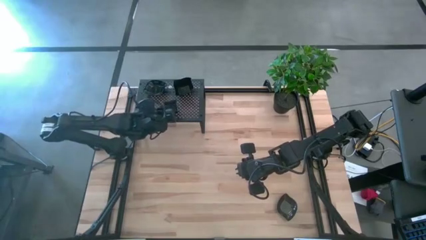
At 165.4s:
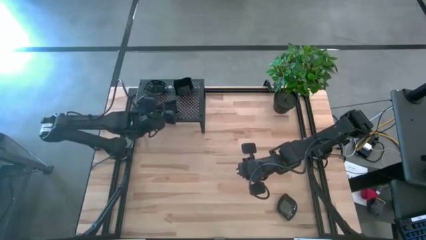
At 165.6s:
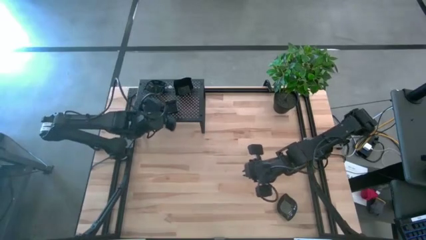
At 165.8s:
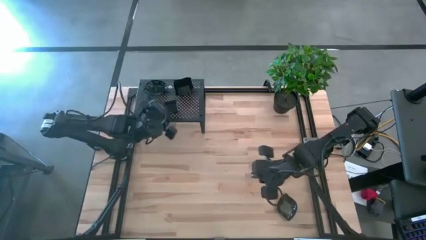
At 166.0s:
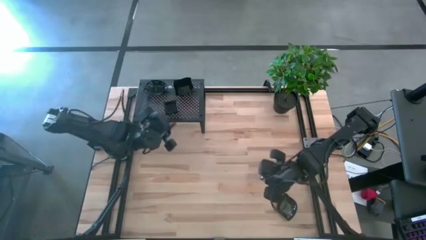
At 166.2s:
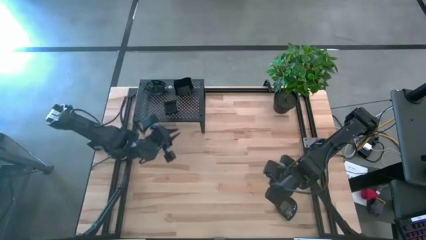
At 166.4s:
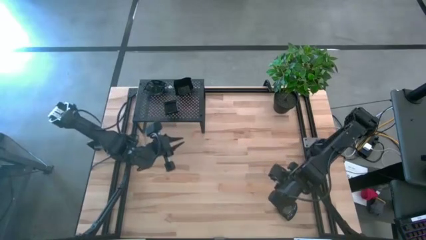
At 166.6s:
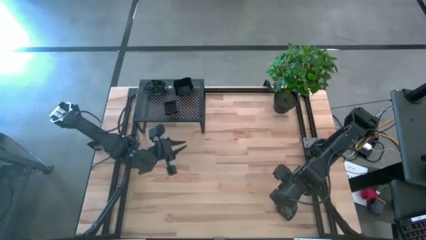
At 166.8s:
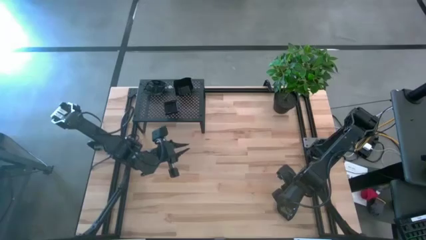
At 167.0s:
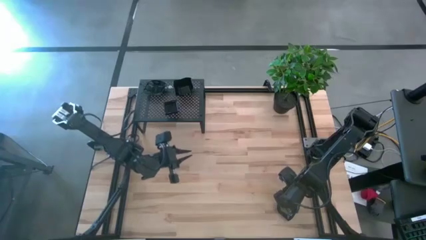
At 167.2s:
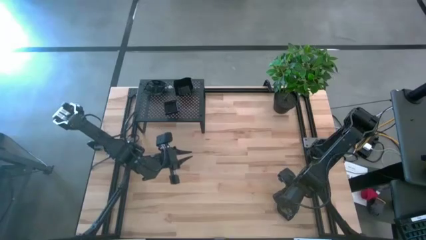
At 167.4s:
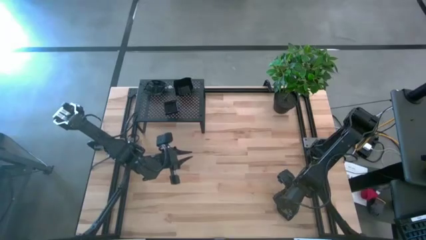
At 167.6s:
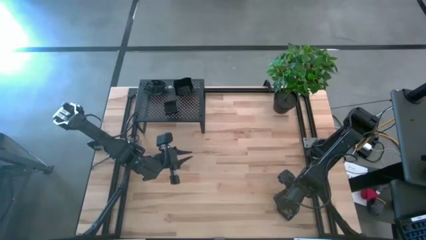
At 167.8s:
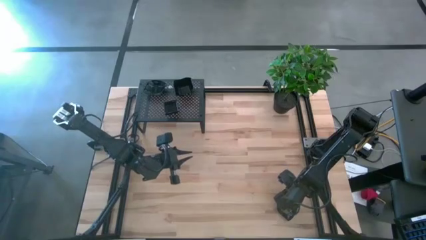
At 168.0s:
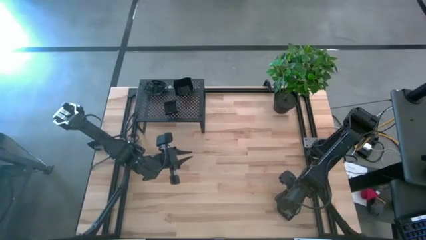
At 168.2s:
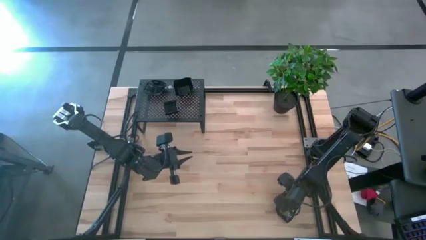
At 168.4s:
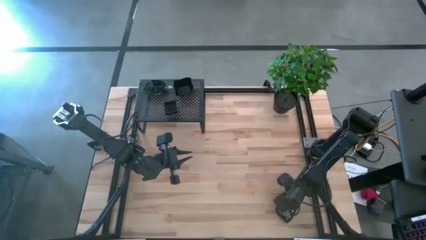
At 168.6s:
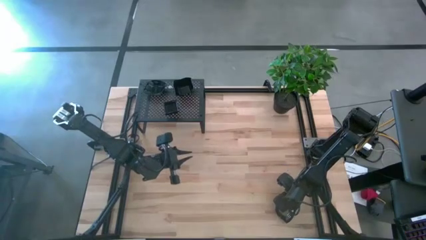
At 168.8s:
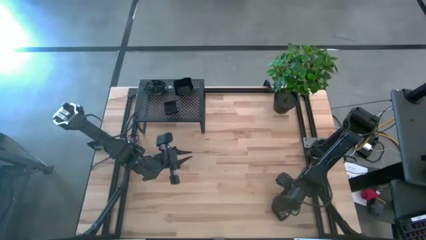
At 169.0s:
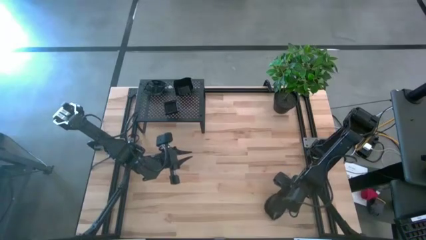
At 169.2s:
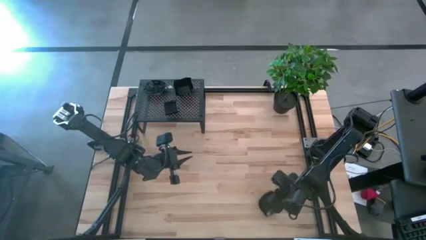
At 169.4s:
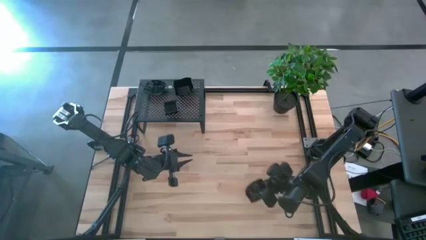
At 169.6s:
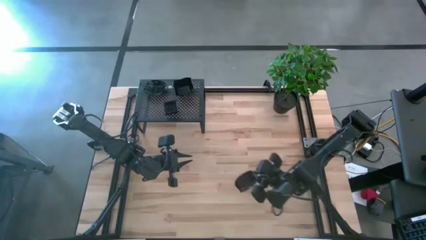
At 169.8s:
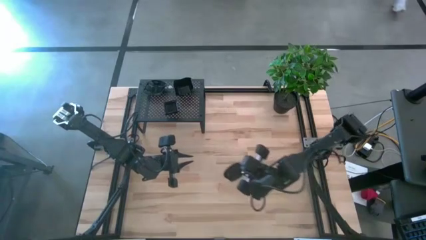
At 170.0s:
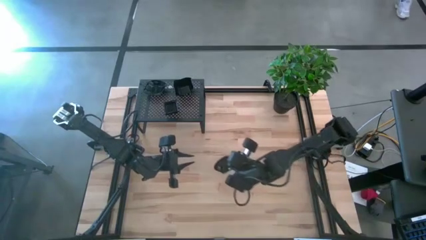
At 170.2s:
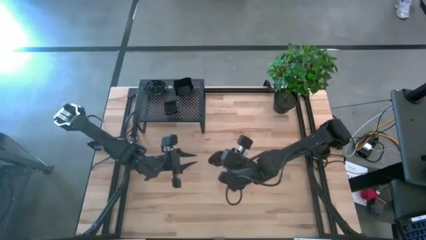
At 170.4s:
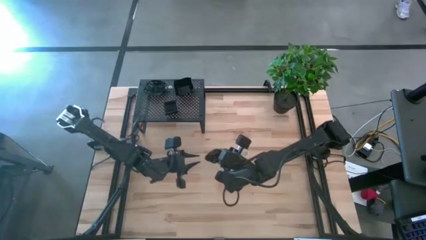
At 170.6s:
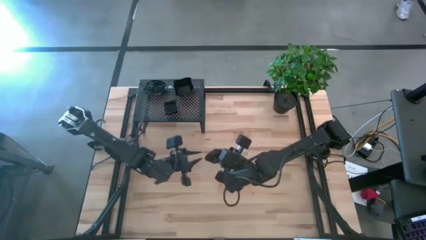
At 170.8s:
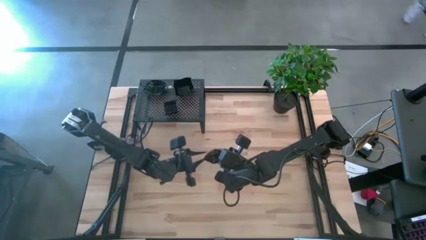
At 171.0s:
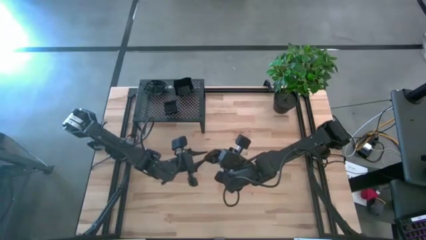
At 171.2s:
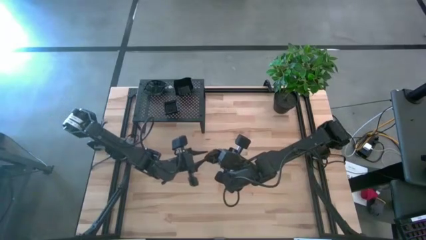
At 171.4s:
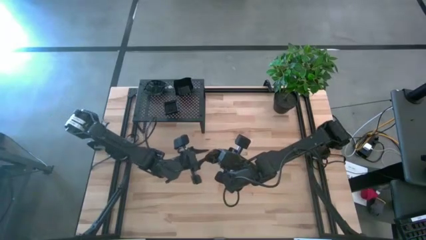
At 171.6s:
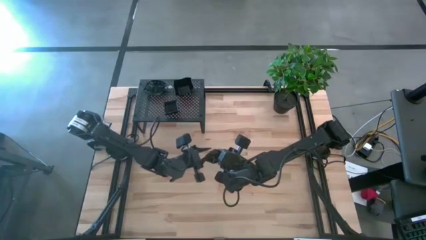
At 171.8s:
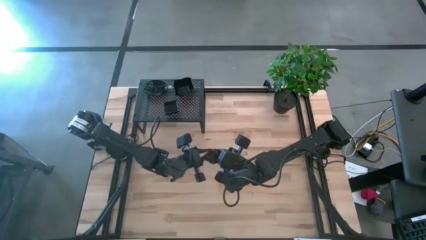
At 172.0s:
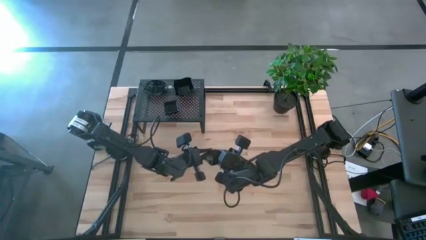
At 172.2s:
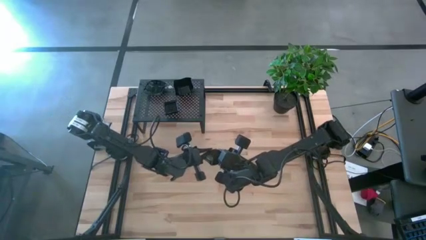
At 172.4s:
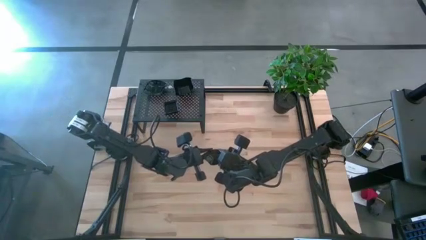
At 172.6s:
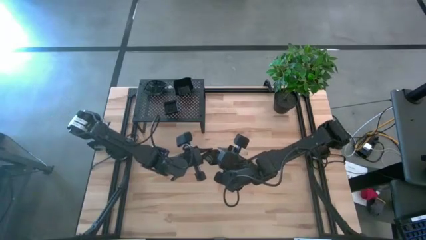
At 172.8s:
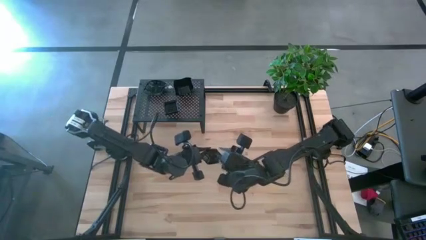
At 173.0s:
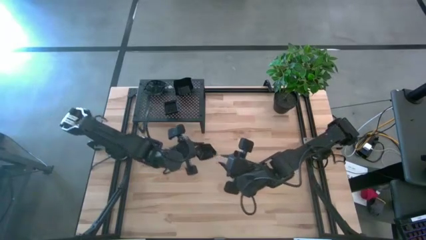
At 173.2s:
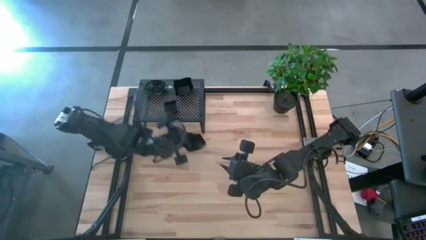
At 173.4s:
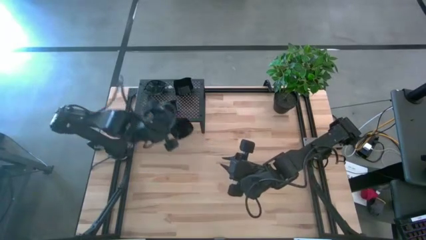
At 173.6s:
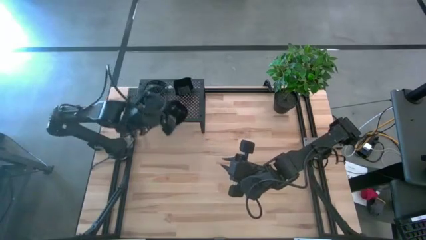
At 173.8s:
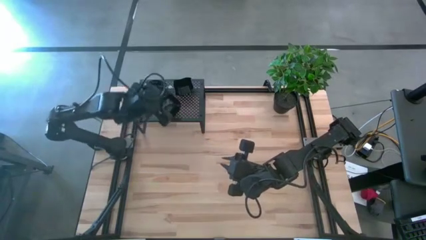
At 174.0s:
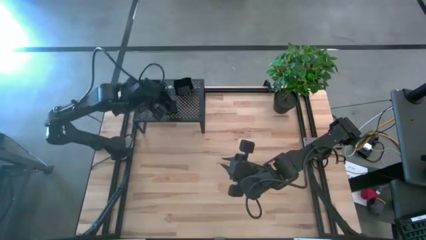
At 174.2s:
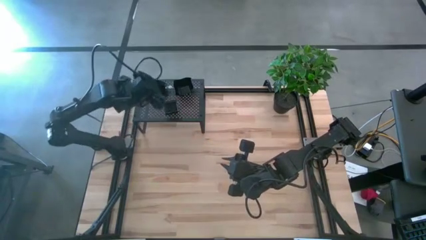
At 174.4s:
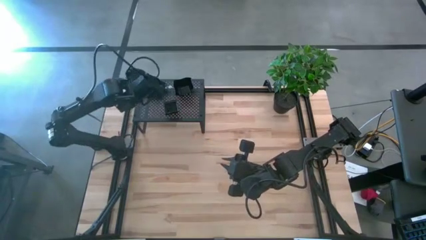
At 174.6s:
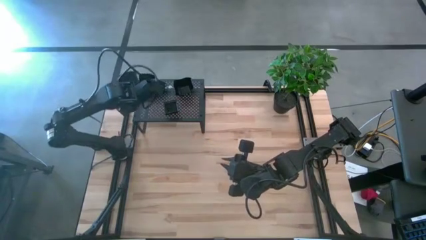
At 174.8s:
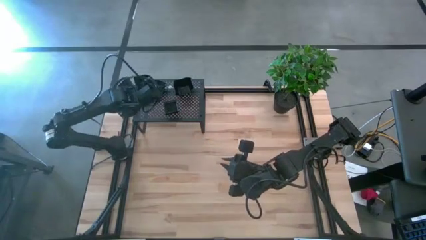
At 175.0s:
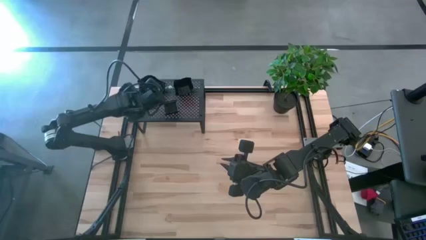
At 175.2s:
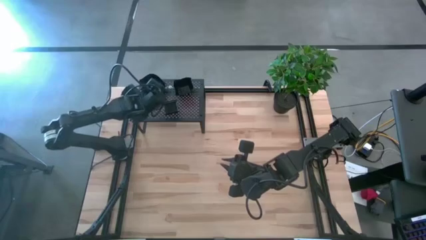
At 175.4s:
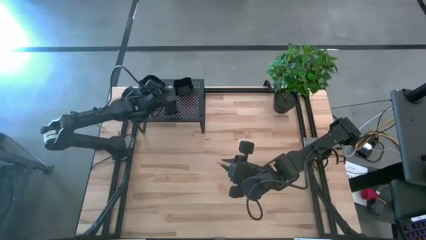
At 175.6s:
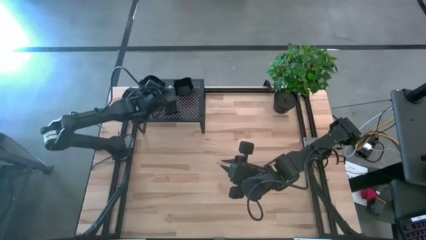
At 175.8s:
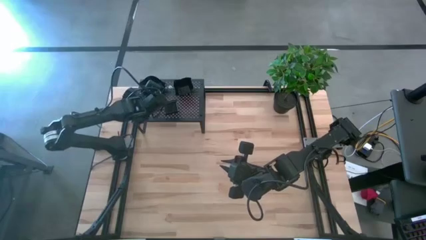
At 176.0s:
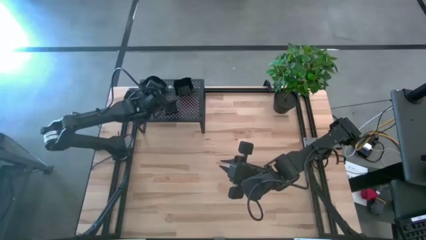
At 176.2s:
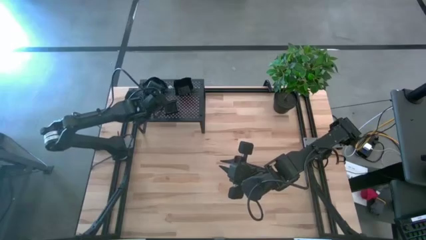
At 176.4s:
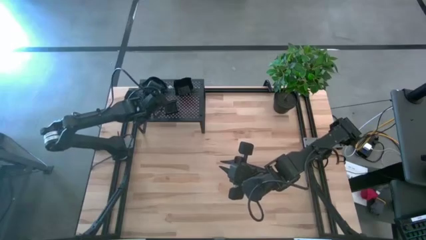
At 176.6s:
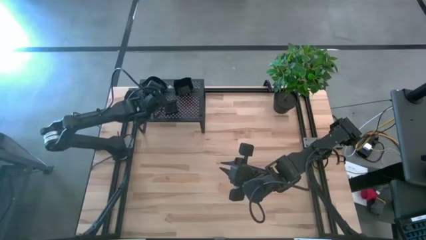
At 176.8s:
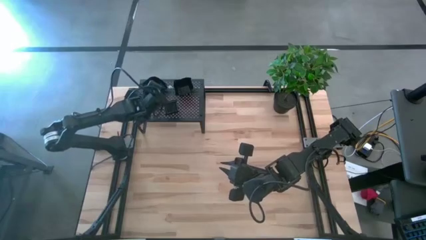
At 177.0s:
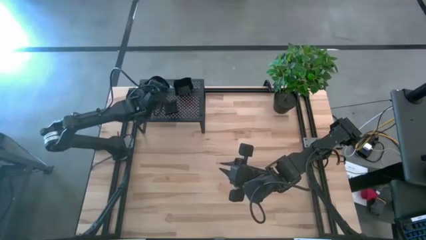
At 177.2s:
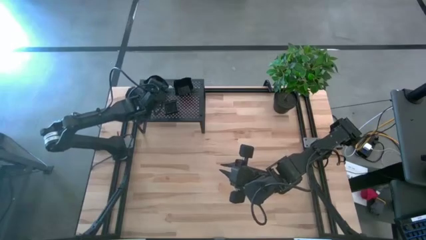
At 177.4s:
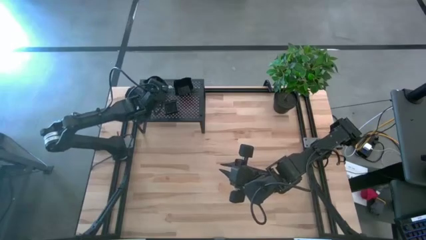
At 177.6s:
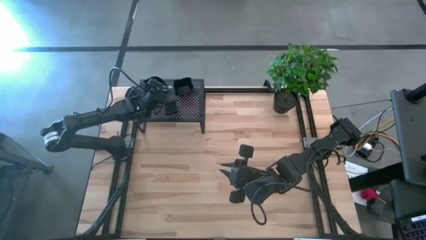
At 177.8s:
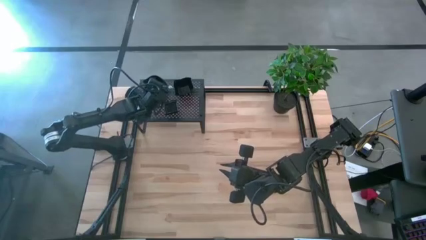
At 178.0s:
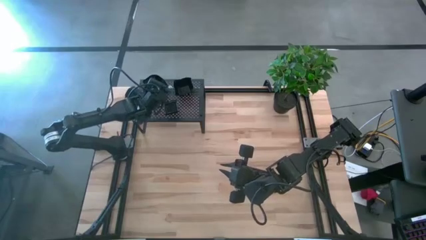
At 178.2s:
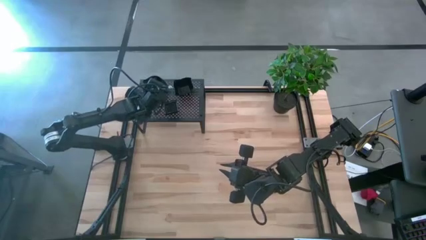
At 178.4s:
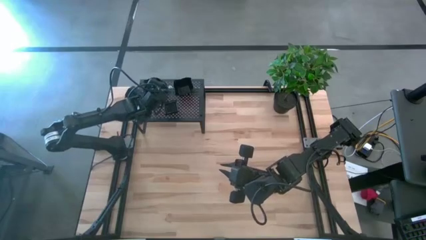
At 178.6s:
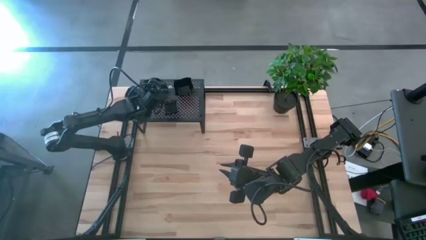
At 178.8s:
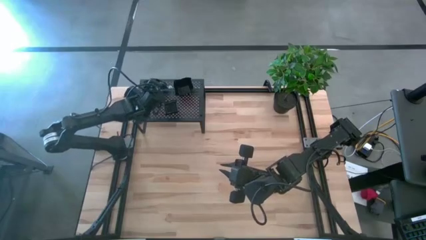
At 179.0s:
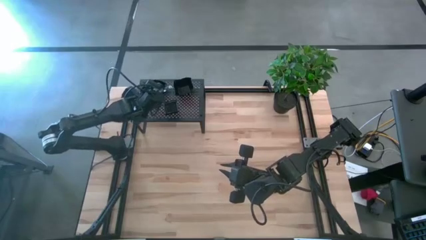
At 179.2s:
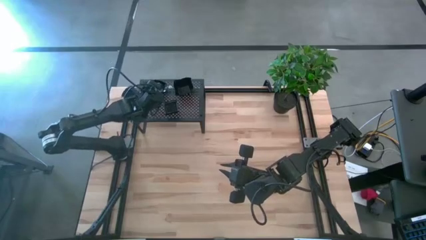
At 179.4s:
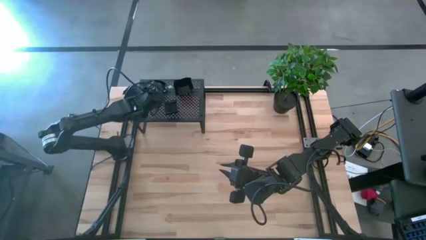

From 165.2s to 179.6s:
Task: Pick & Place Mini shaped plates
Stack the leaf shaped plate on top of the stacked leaf shaped plate on the shelf

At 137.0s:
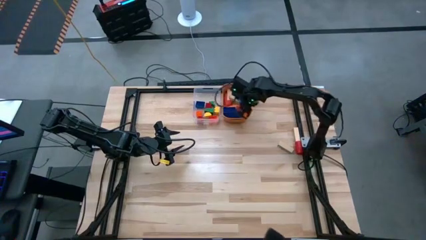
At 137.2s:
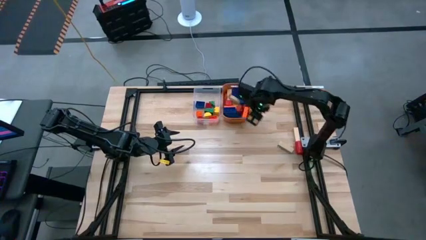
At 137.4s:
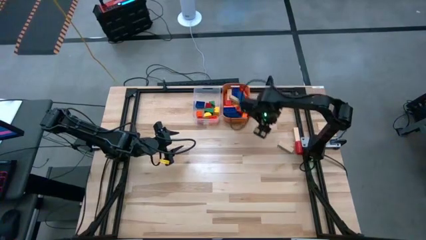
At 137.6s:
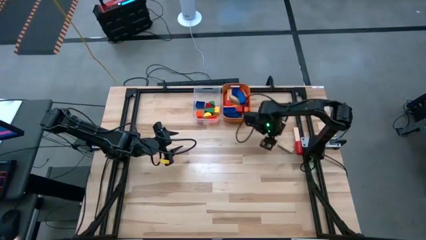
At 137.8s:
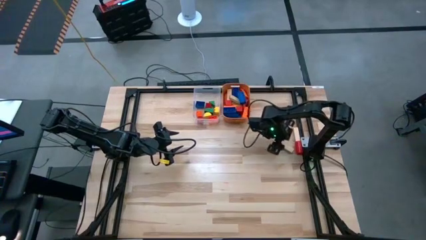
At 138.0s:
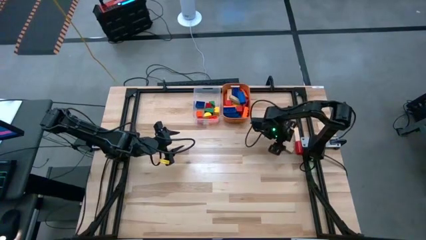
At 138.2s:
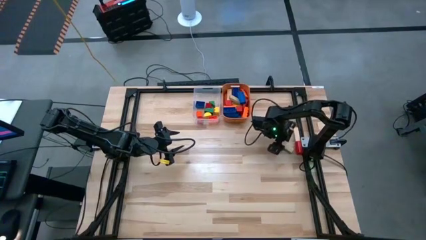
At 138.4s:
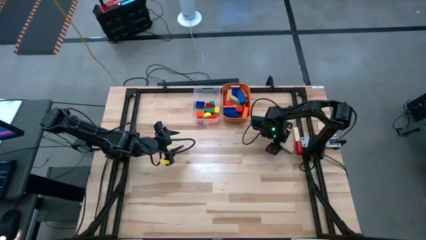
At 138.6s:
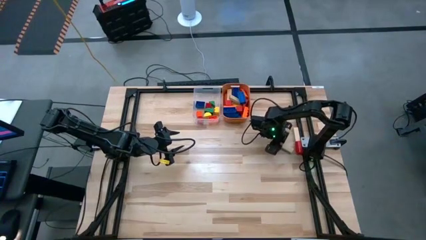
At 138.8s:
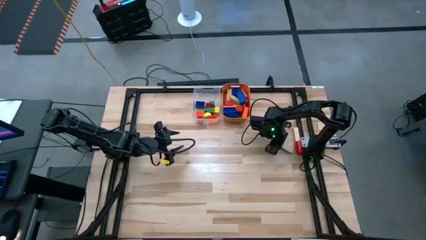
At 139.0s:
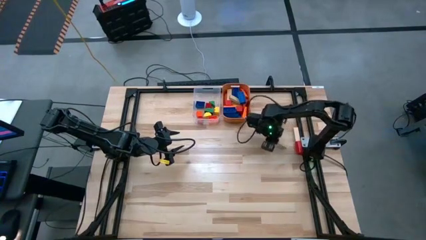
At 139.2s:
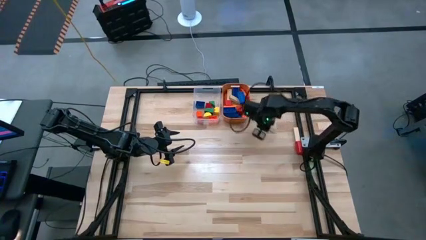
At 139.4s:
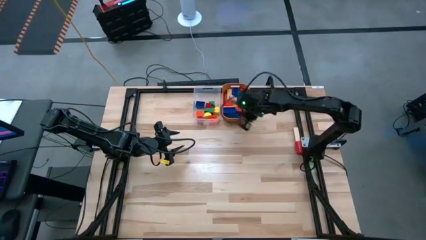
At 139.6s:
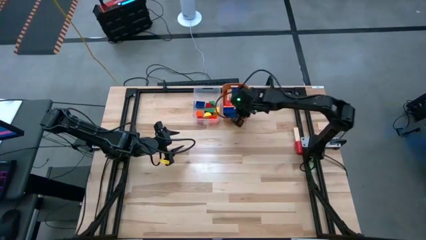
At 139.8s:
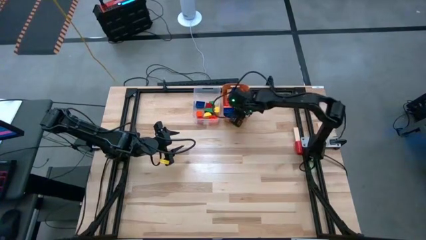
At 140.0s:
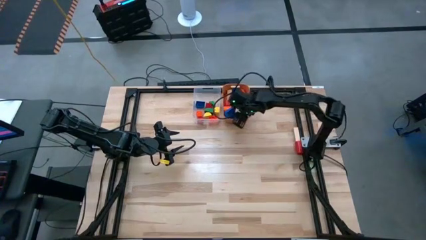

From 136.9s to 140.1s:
Task: Sort blocks by size
Put the wood rectangle block into the orange bin
